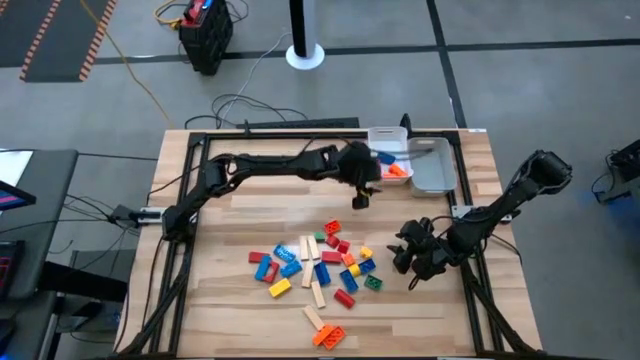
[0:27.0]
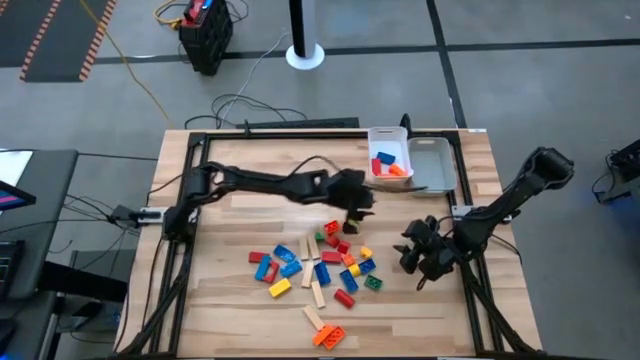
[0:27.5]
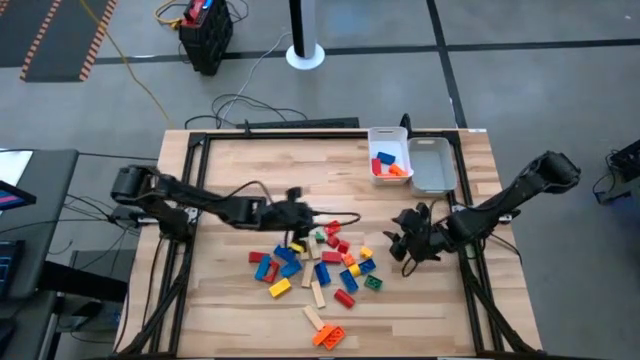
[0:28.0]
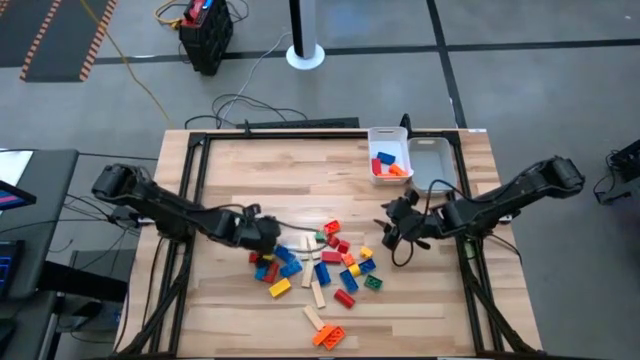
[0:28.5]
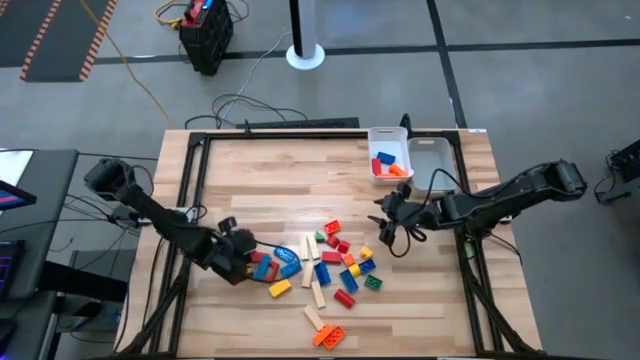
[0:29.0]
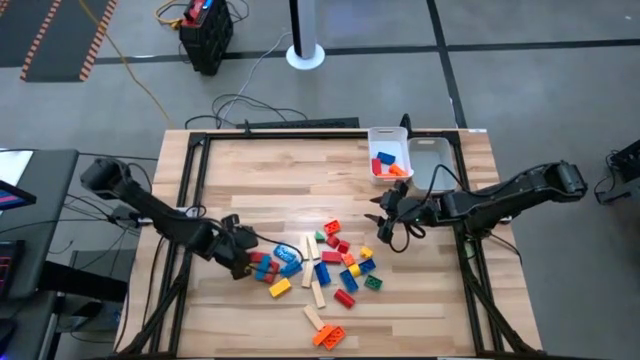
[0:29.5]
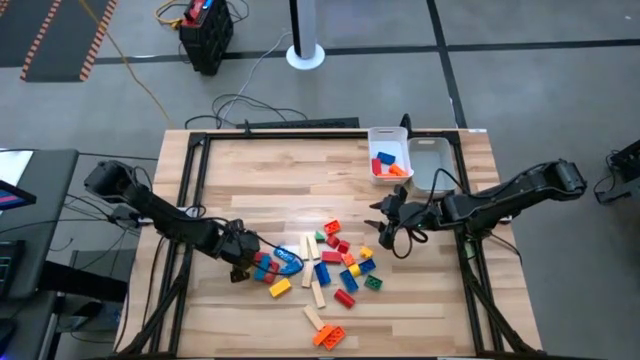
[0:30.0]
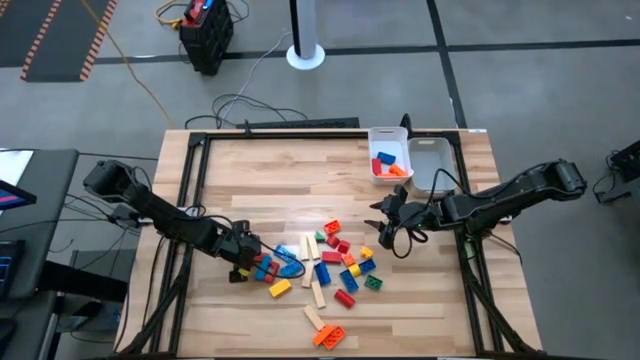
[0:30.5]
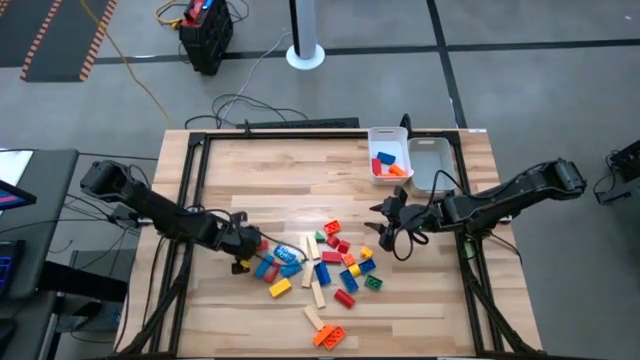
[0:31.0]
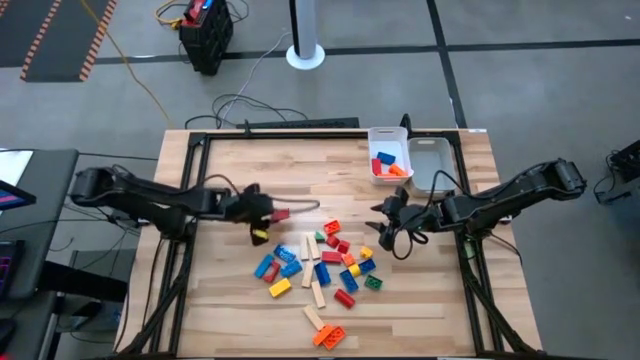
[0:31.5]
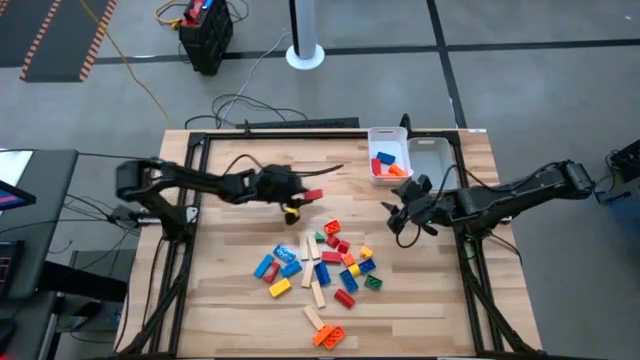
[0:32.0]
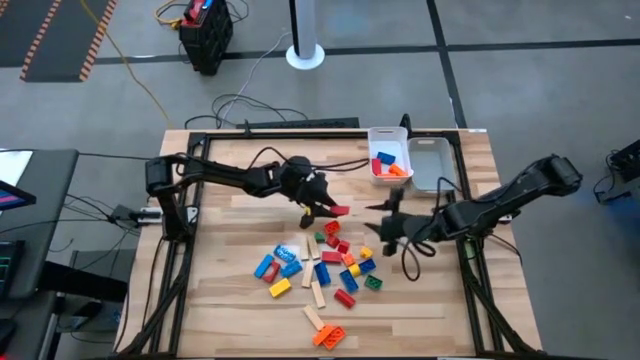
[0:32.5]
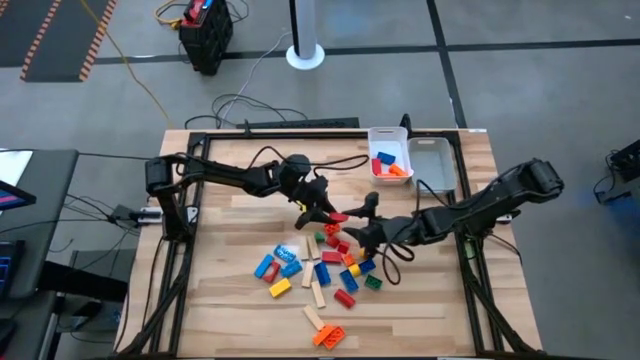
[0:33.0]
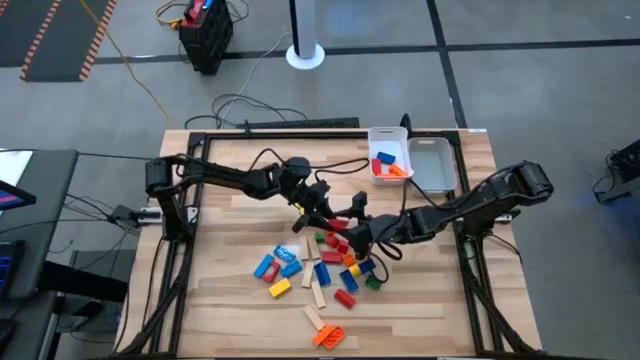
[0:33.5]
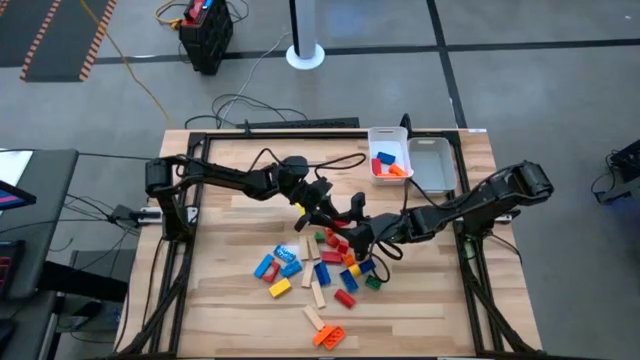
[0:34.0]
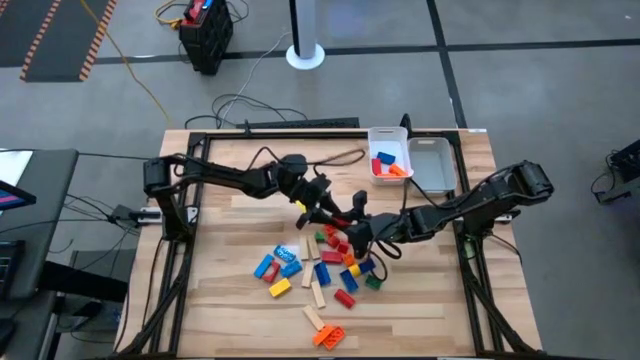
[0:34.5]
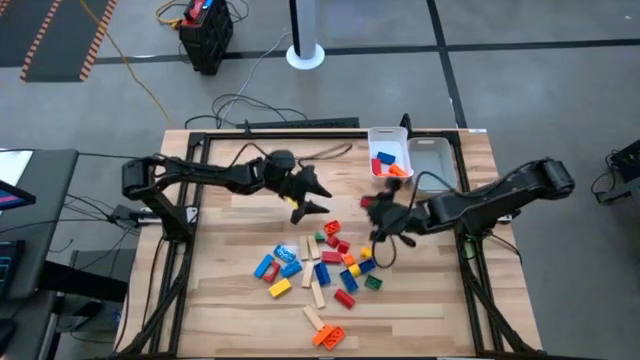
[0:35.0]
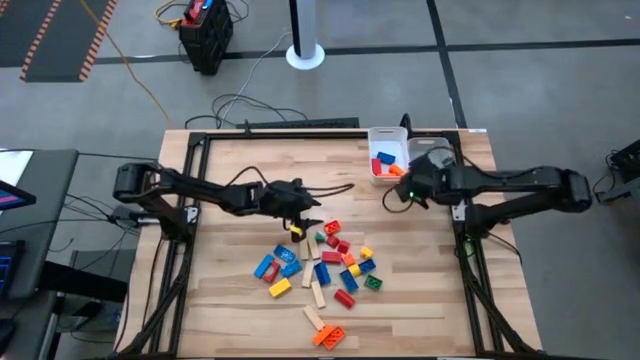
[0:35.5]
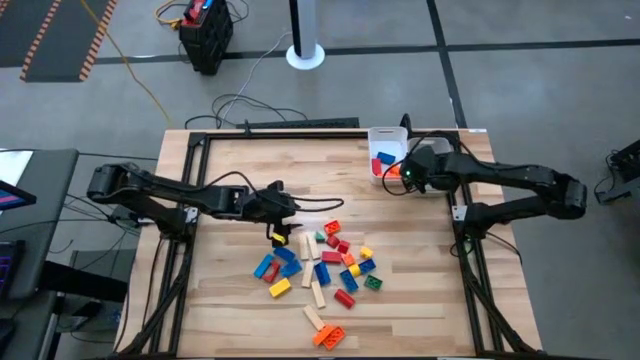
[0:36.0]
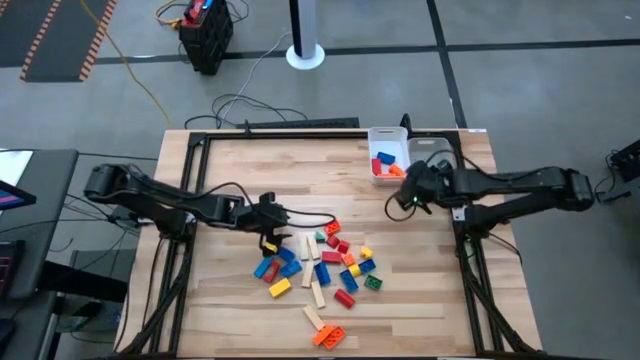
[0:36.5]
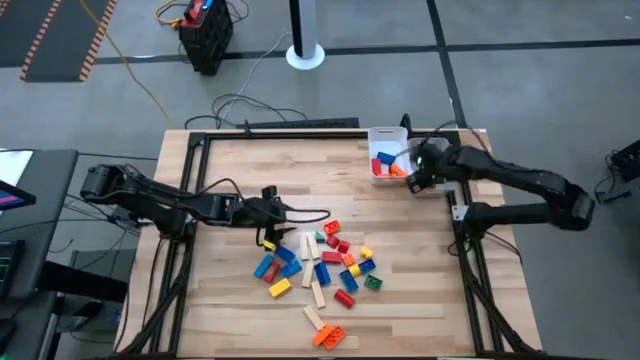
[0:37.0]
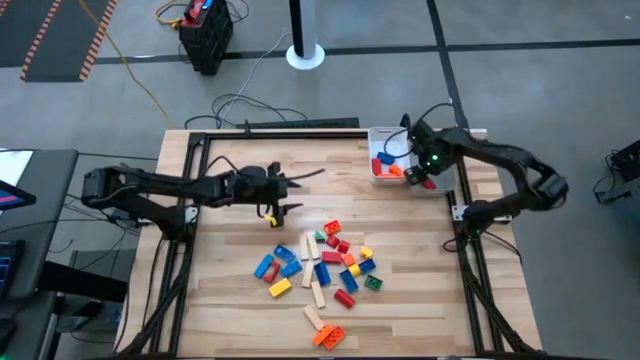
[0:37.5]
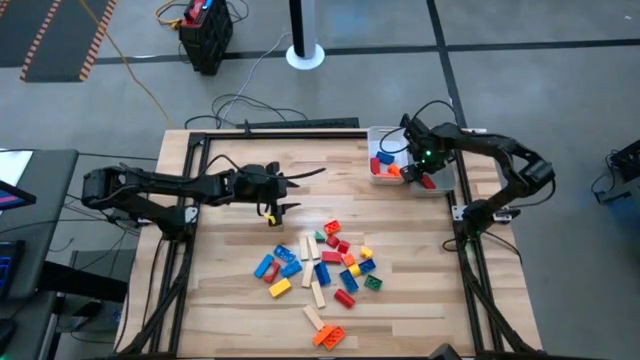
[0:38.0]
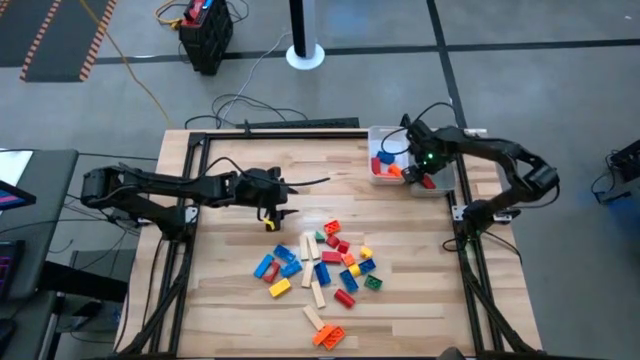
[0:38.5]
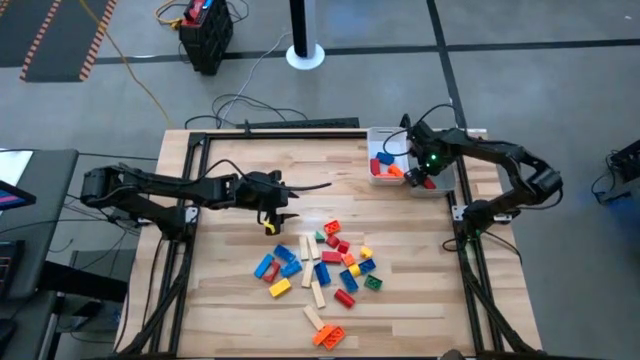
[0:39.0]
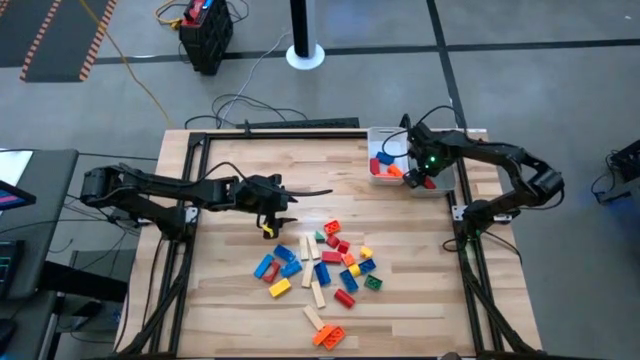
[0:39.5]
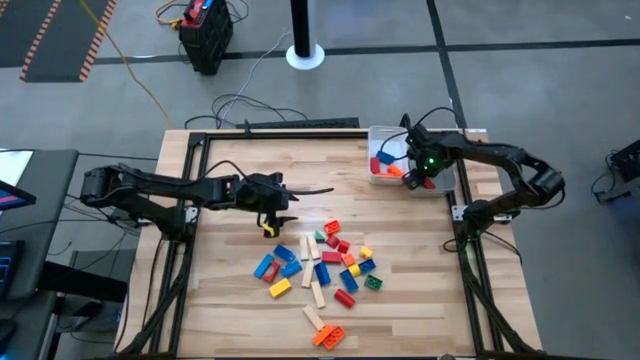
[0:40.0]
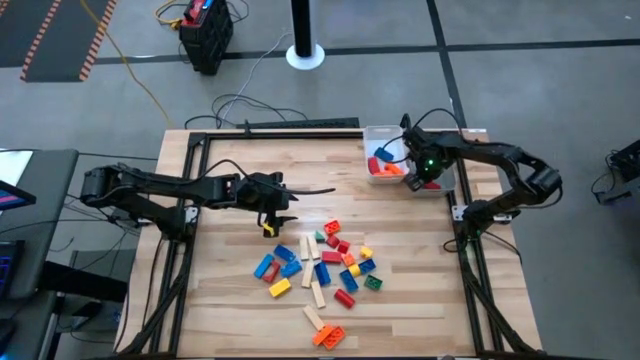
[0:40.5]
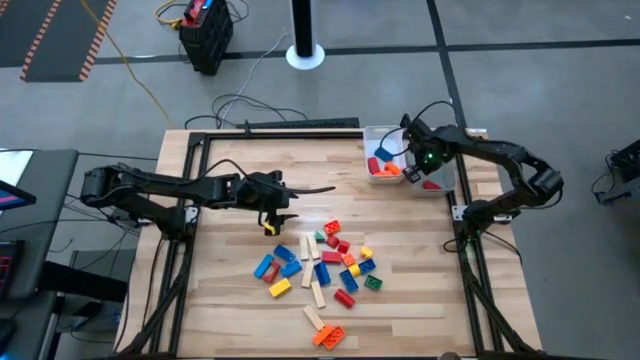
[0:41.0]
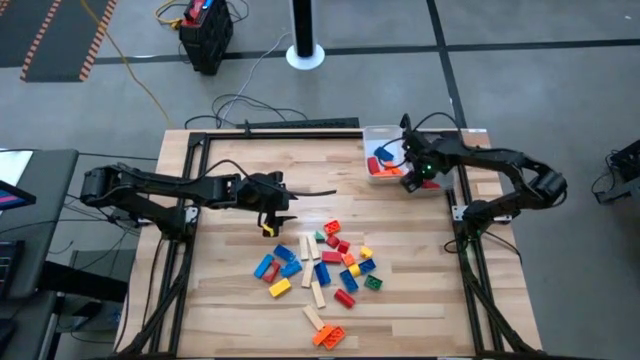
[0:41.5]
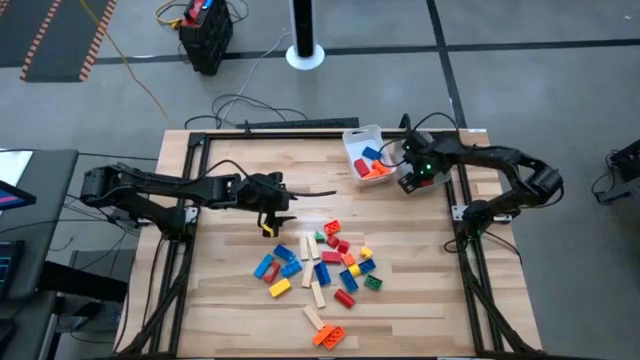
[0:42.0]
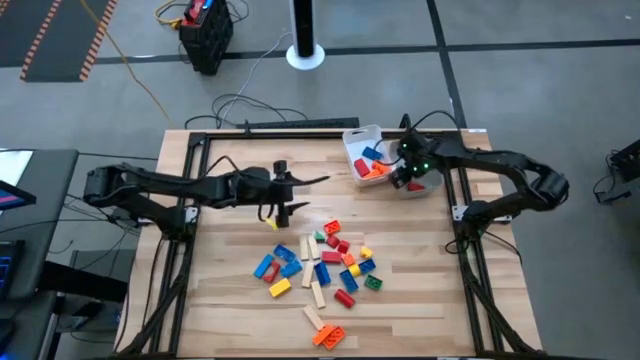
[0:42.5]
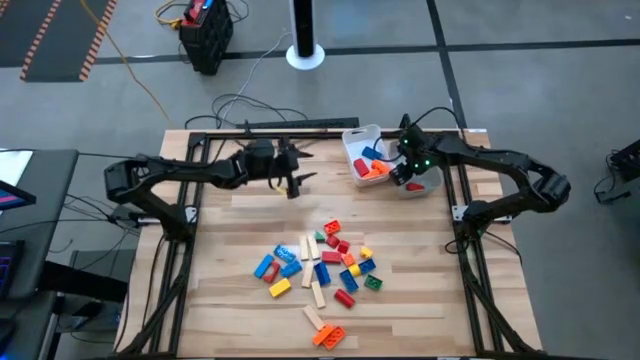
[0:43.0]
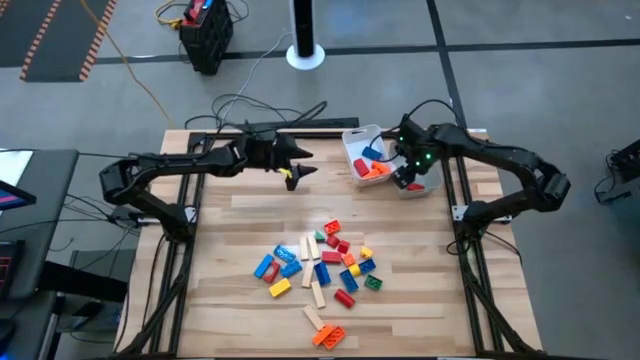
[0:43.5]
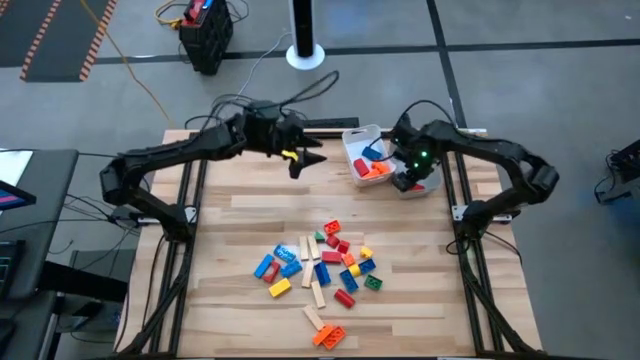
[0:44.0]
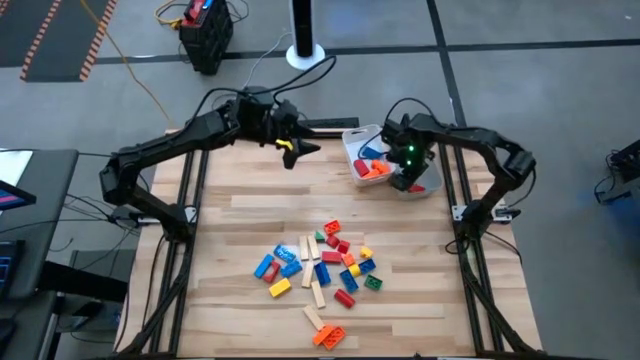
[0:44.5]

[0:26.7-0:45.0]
Task: Sort blocks by size
Put the large red triangular wooden block into the white bin

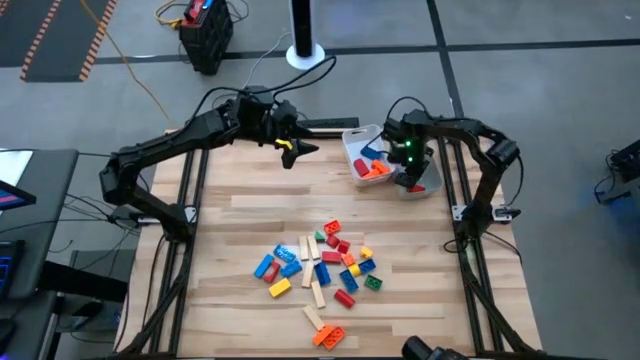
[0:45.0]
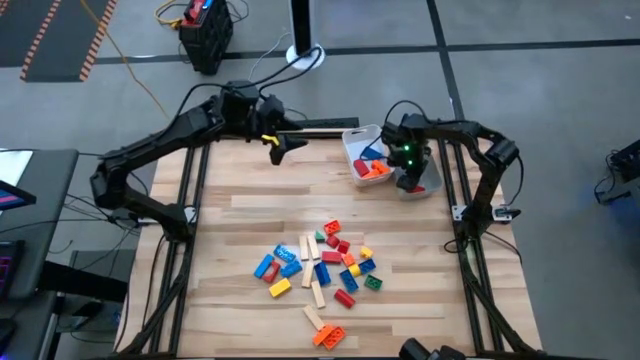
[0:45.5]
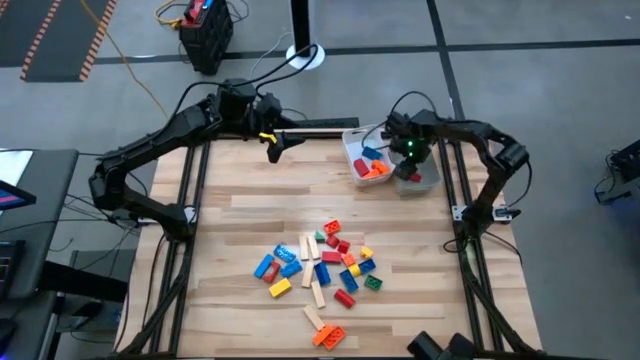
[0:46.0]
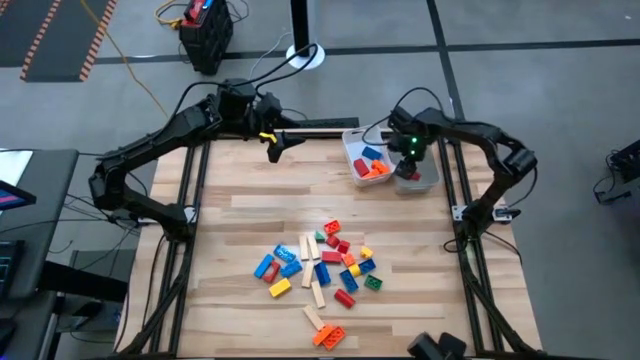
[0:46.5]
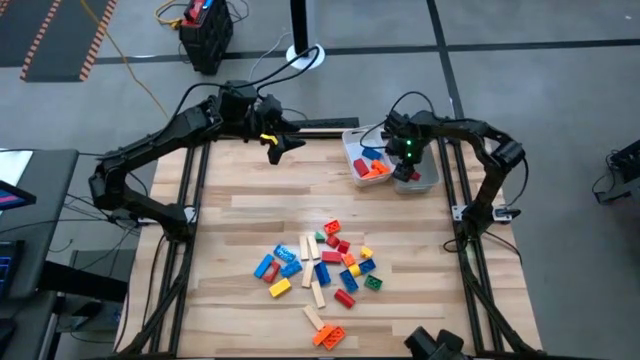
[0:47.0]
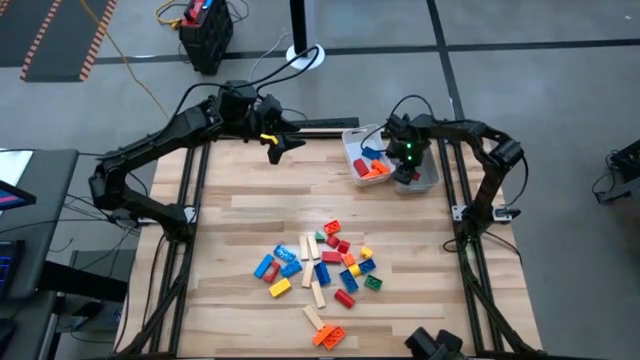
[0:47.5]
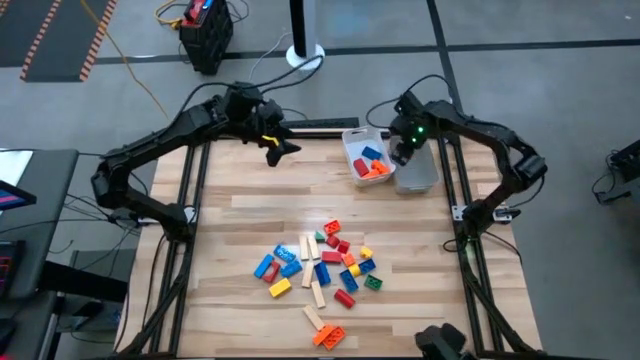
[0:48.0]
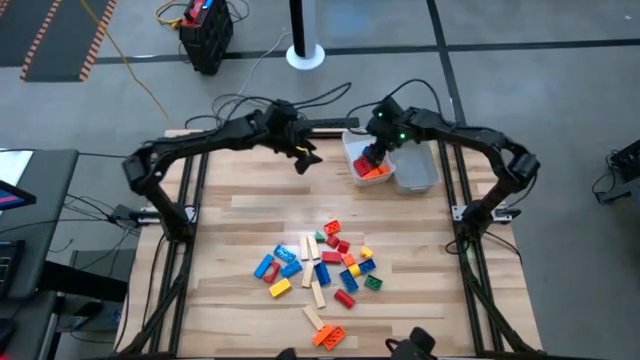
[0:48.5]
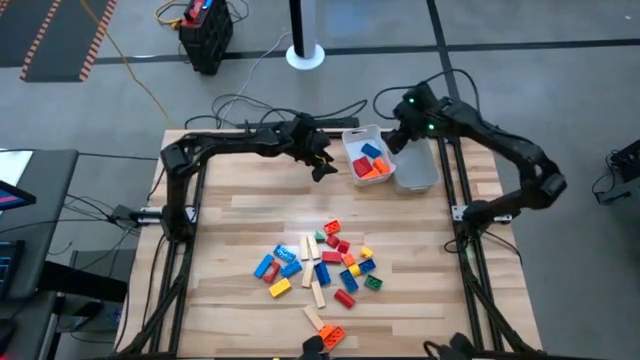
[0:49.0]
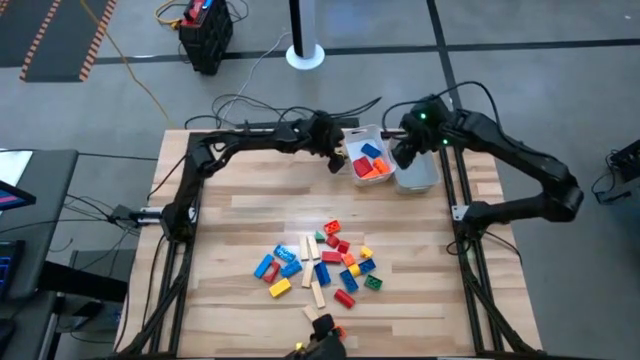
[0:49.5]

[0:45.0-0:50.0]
Put the large red triangular wooden block into the white bin
